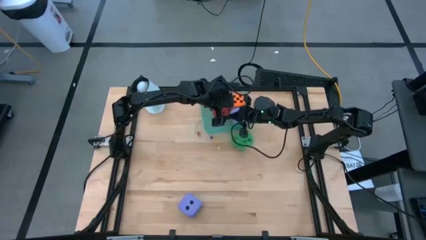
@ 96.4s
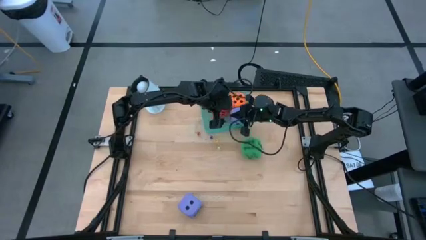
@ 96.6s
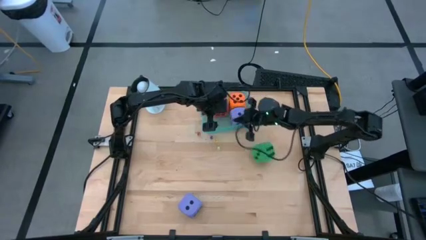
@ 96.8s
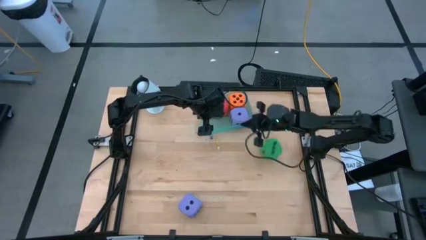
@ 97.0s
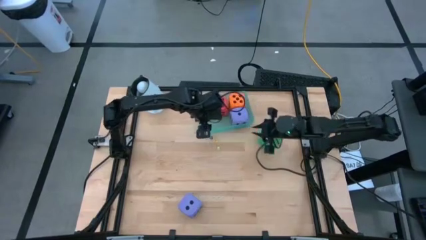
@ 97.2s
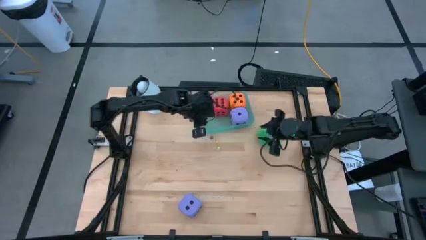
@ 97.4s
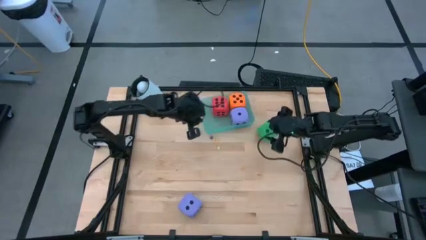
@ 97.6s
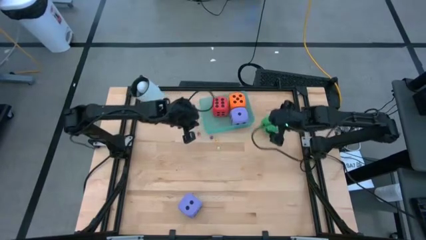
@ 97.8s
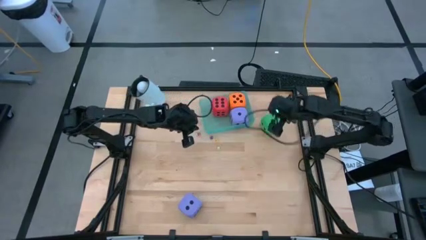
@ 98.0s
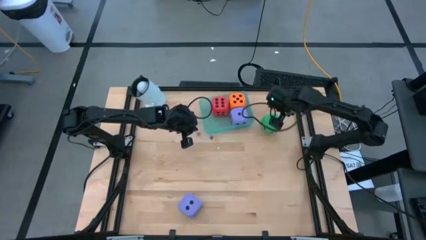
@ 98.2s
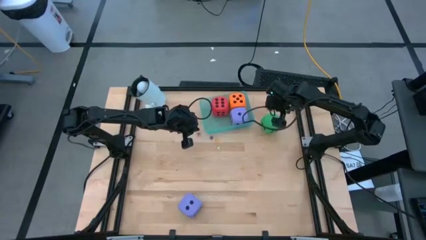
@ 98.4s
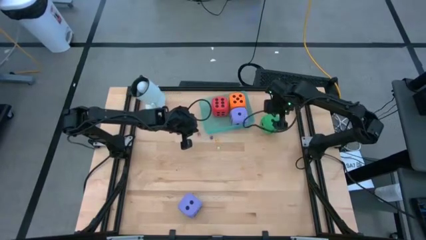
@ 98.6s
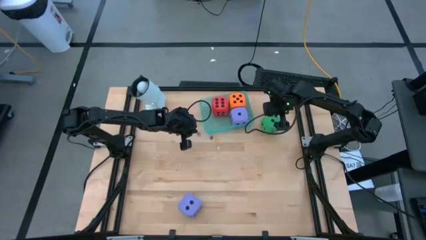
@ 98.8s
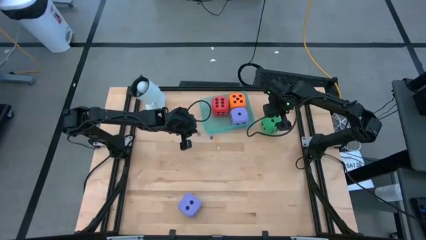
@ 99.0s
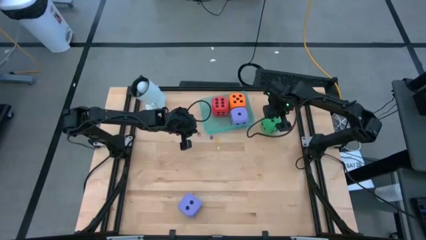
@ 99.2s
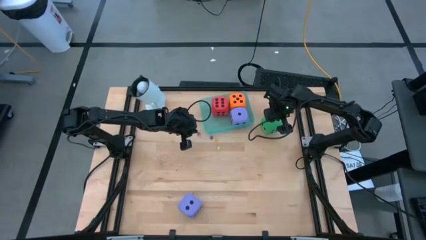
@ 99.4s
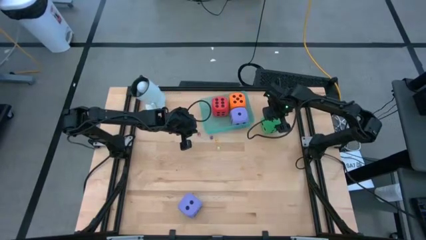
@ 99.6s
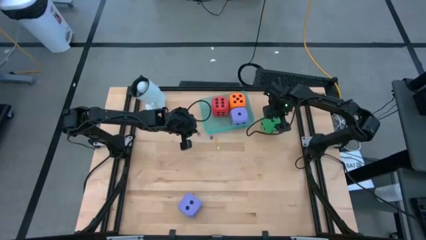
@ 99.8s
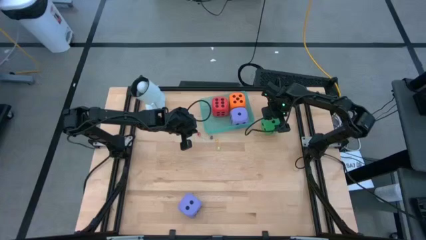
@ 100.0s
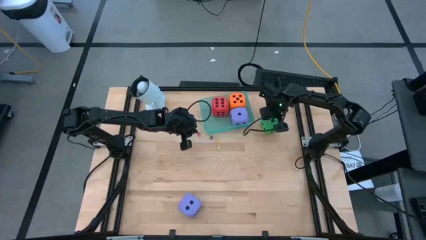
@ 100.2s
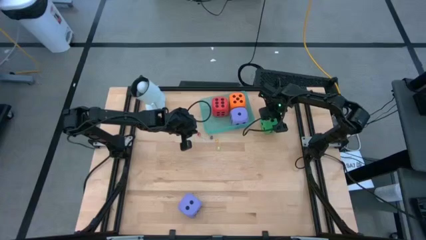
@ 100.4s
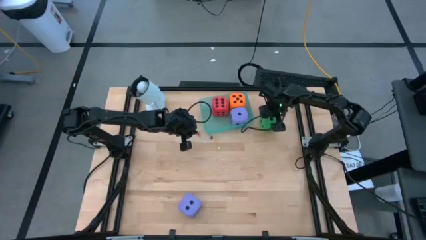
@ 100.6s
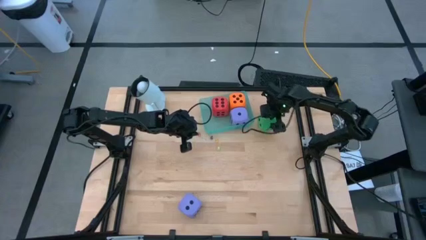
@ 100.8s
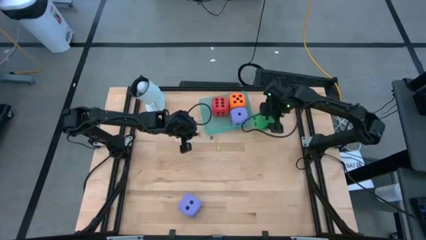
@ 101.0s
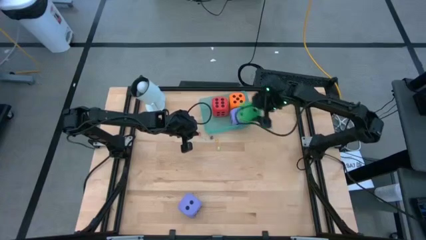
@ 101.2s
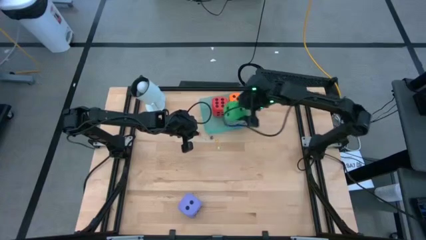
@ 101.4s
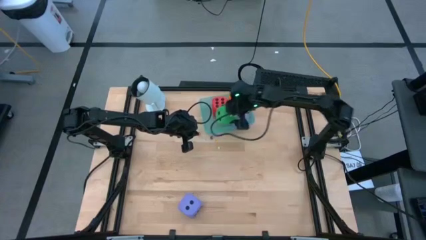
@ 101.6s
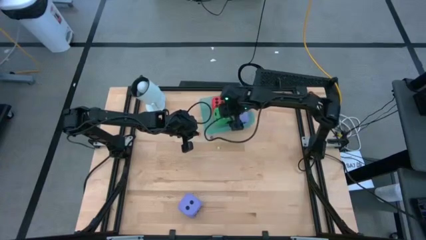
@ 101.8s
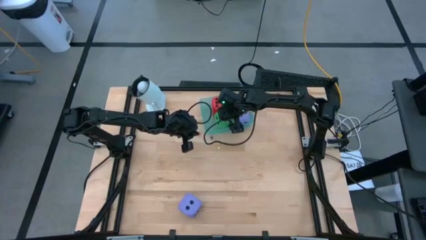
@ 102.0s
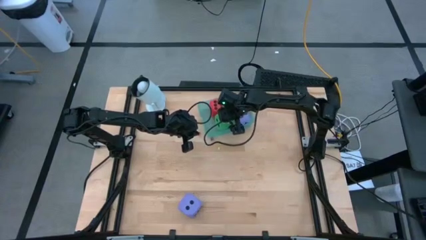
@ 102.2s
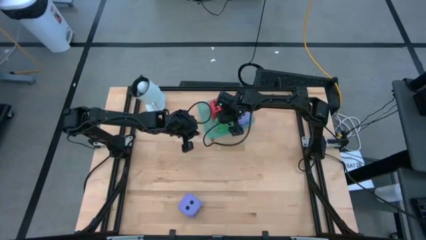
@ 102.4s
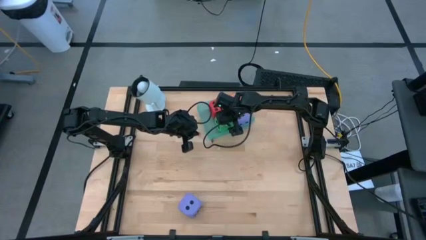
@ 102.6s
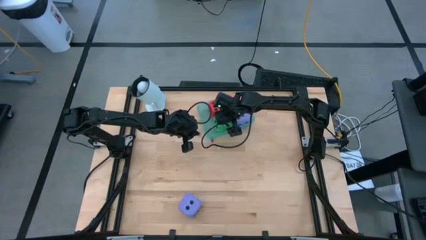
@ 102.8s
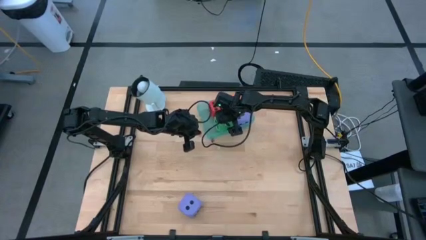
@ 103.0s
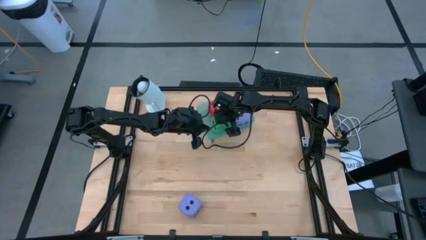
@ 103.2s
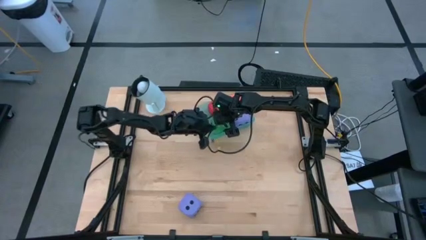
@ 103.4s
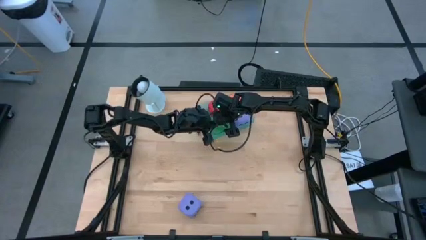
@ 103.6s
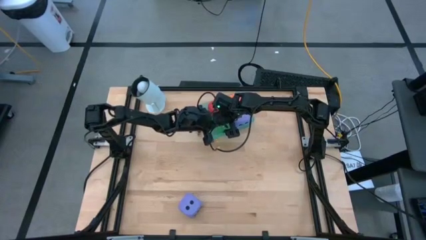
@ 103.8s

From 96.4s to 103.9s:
Task: Pick & Place Dice
Put the big green dice into the bin

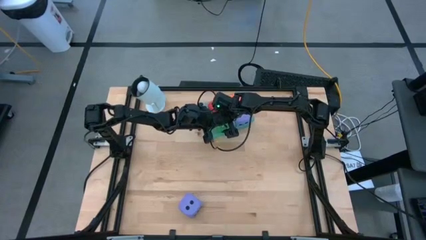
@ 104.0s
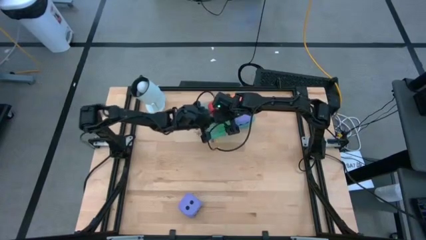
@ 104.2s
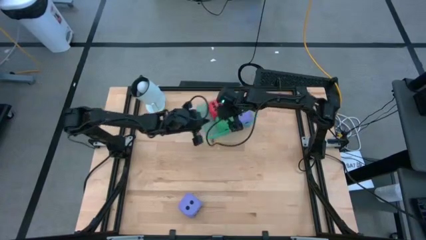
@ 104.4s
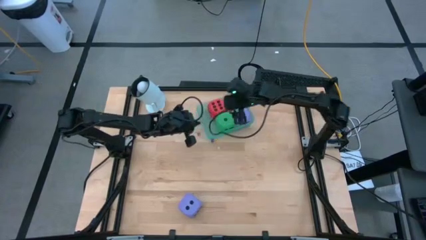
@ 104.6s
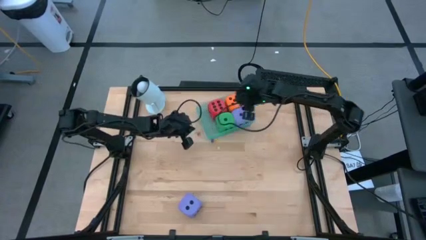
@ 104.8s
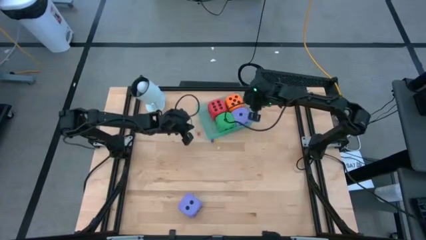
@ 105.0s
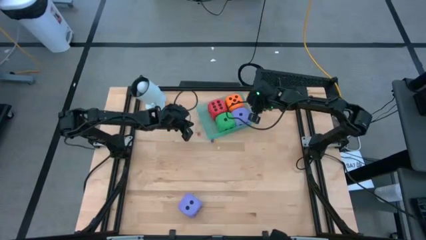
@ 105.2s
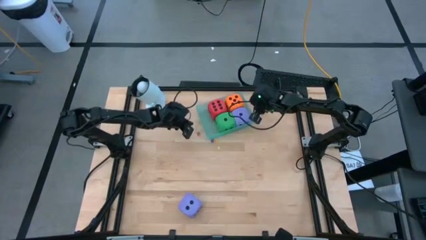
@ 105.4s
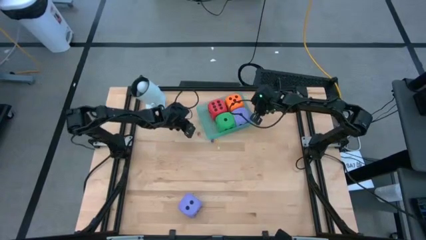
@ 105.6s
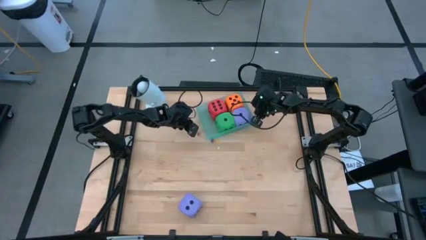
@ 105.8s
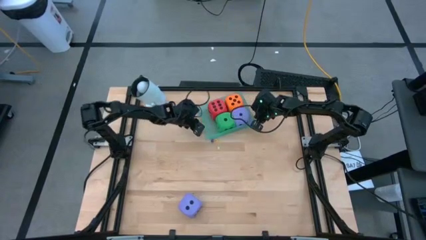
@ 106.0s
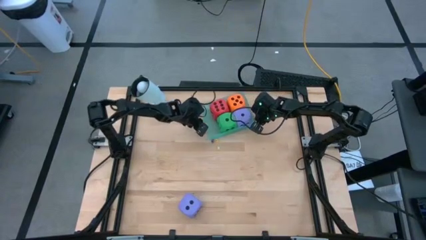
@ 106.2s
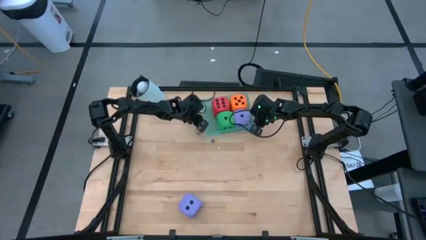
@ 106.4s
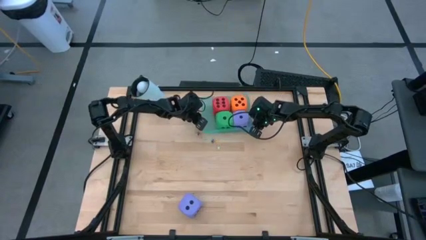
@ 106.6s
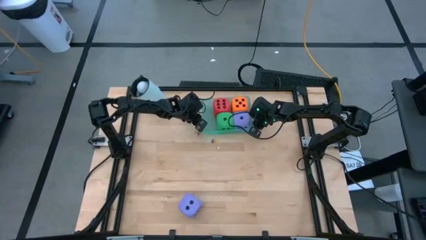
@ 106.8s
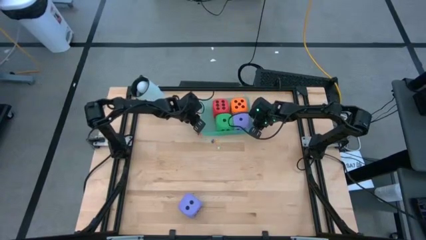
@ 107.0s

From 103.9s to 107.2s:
Adjust the bin

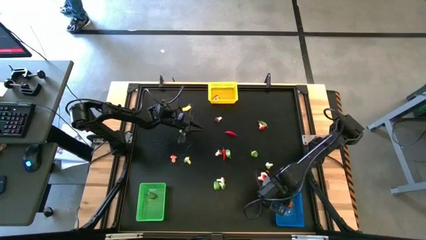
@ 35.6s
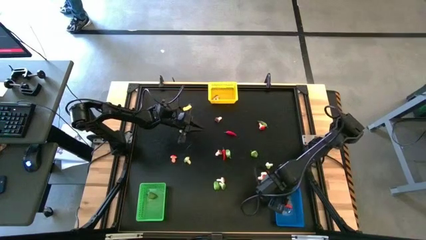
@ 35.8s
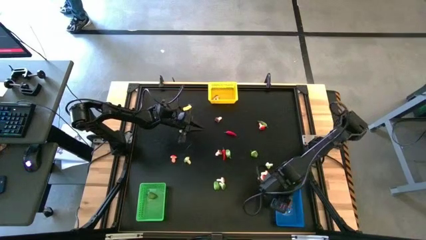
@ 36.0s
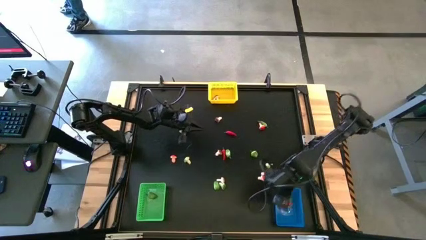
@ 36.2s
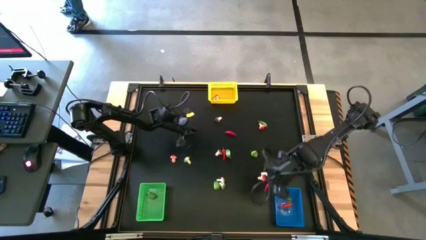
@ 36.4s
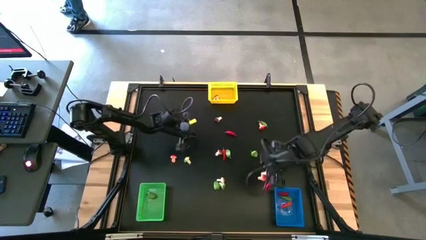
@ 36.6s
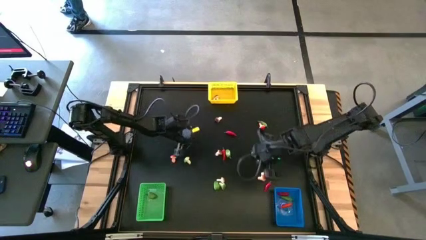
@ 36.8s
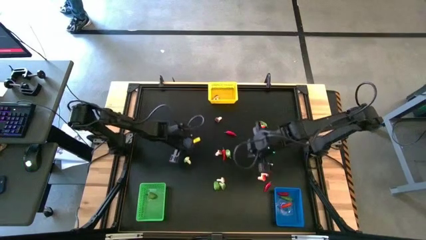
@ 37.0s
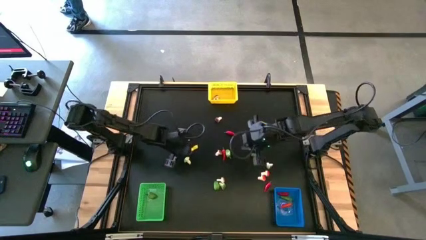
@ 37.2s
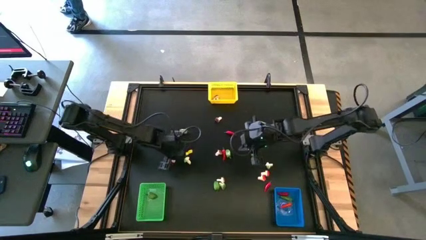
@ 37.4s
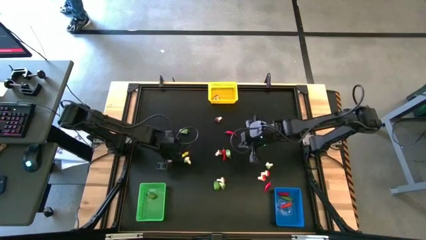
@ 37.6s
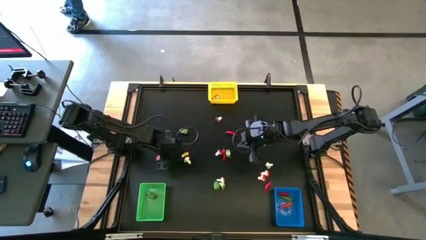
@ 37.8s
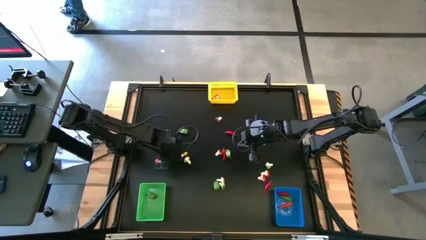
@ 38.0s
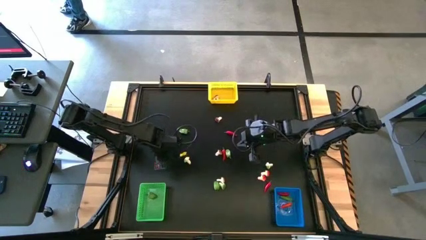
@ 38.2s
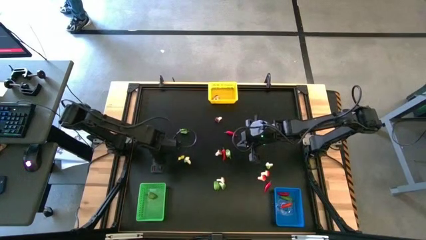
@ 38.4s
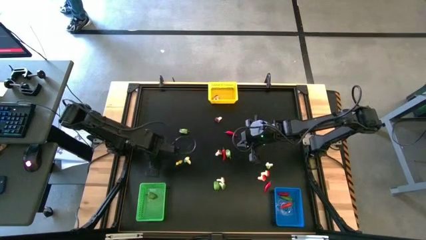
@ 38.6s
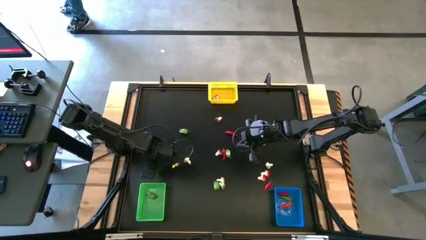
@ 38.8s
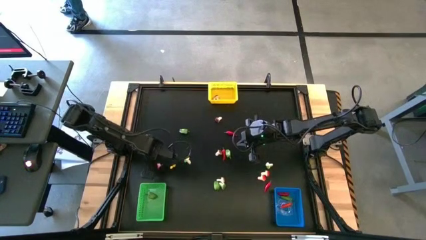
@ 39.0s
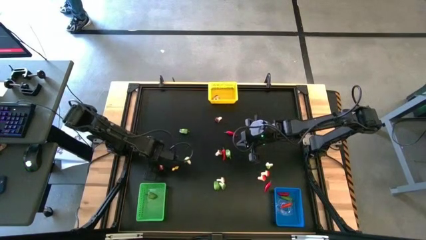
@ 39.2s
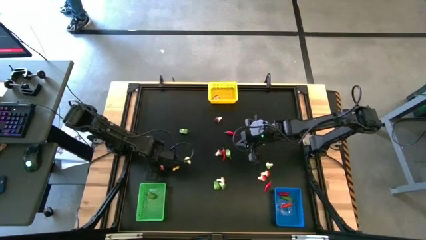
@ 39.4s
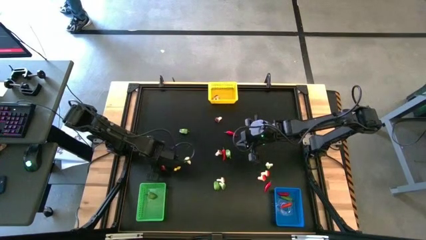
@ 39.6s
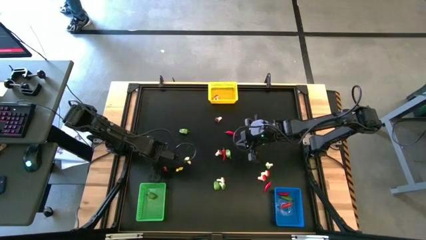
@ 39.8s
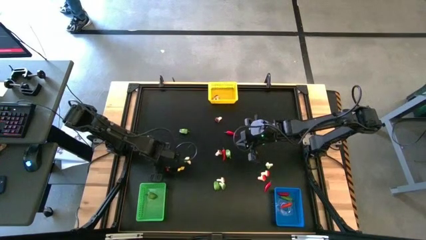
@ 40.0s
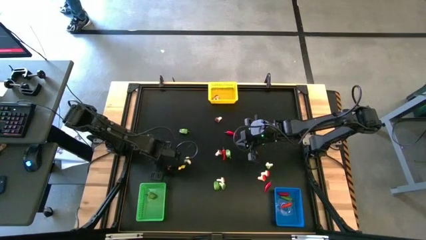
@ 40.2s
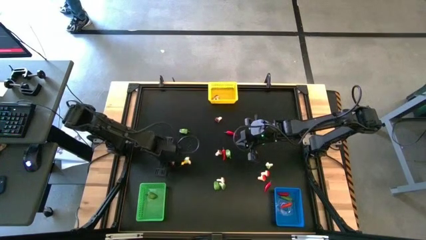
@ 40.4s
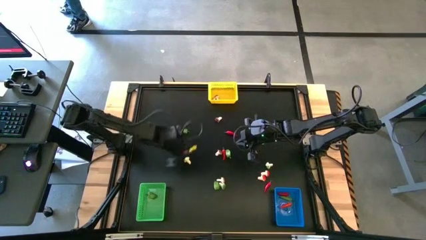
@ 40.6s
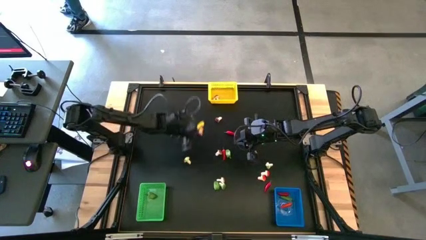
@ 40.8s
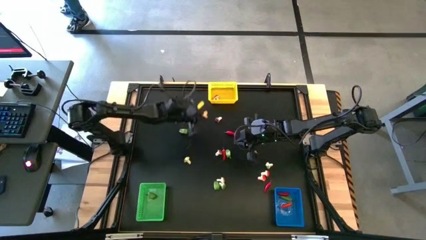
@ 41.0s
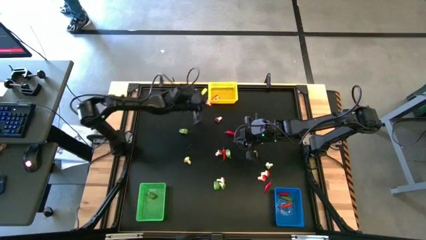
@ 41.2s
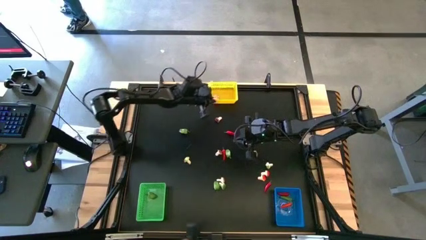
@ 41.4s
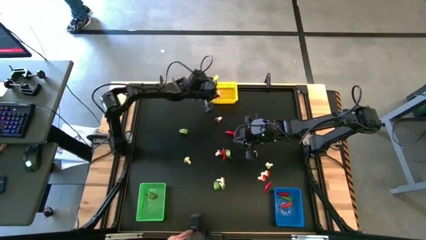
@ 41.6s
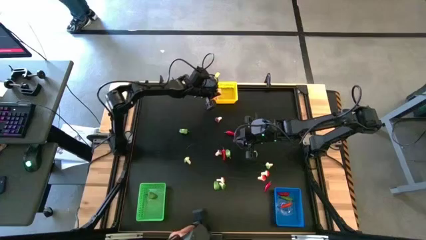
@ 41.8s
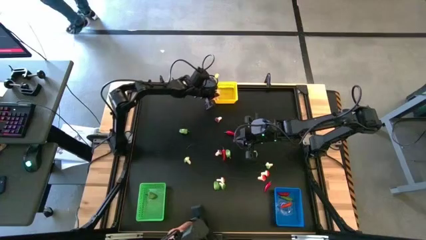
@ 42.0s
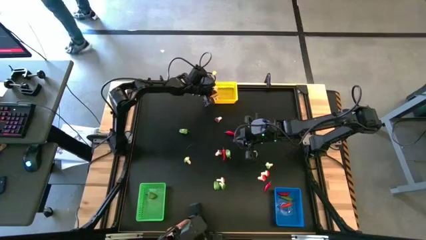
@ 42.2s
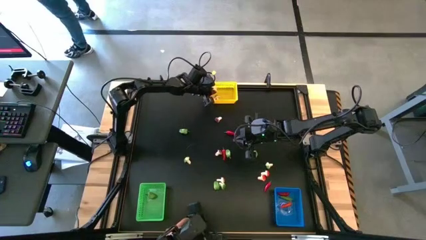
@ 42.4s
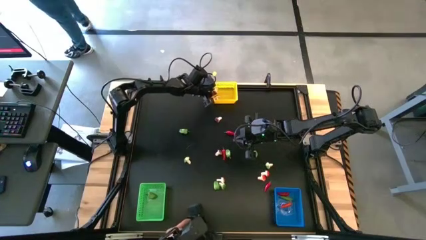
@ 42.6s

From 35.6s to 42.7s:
Task: Sort produce into baskets
Put the bottom left red mushroom into the yellow bin
